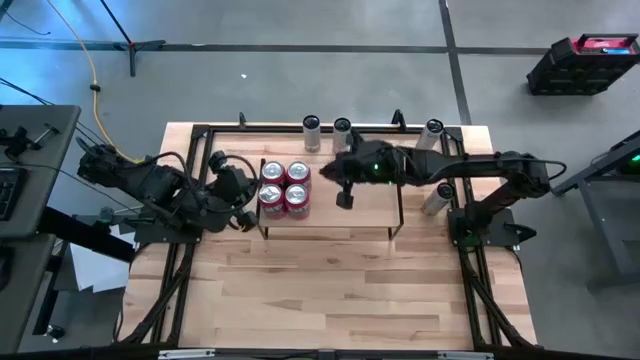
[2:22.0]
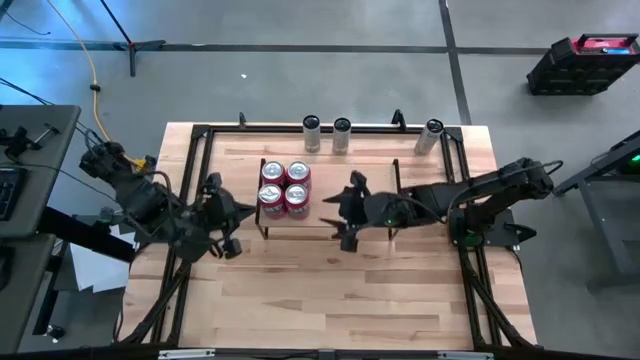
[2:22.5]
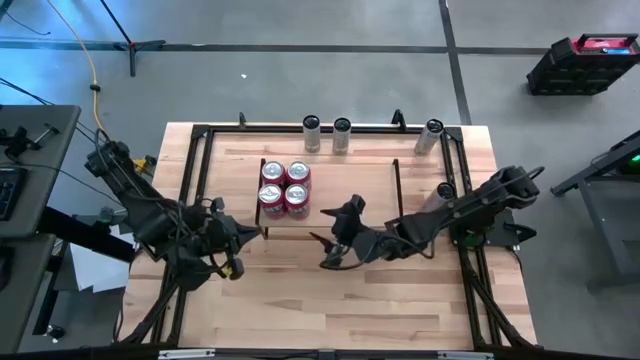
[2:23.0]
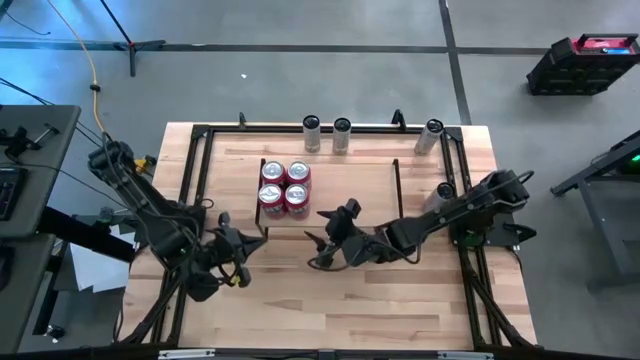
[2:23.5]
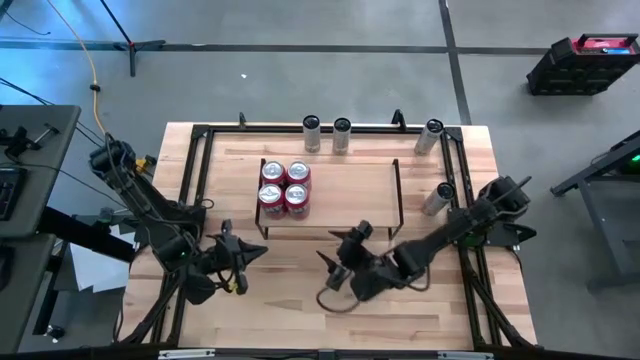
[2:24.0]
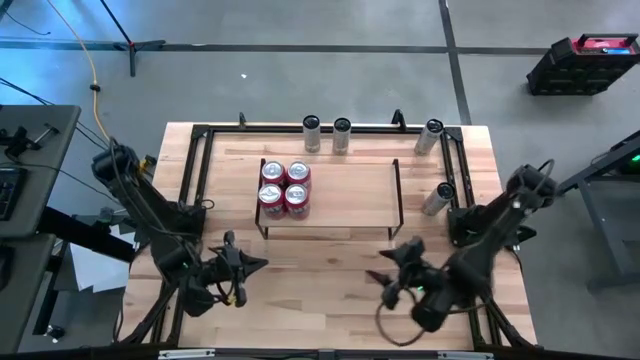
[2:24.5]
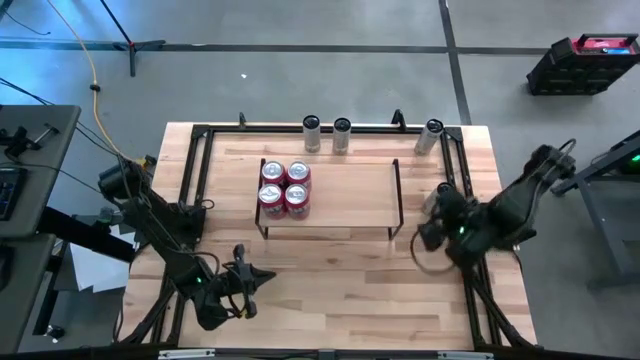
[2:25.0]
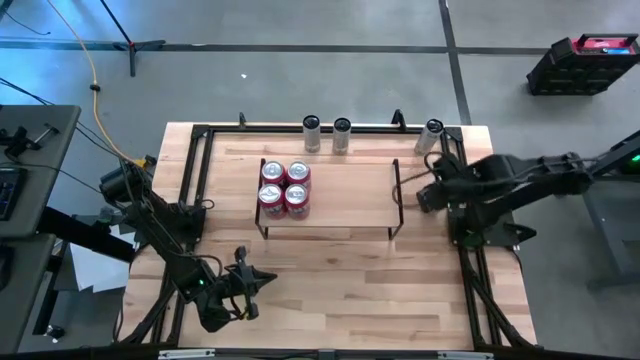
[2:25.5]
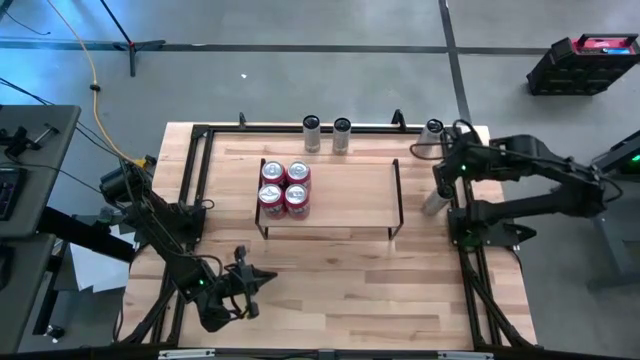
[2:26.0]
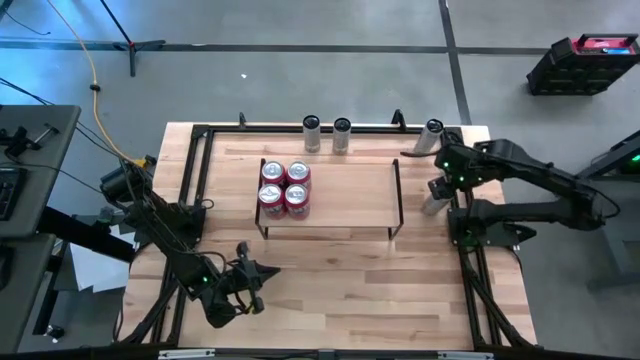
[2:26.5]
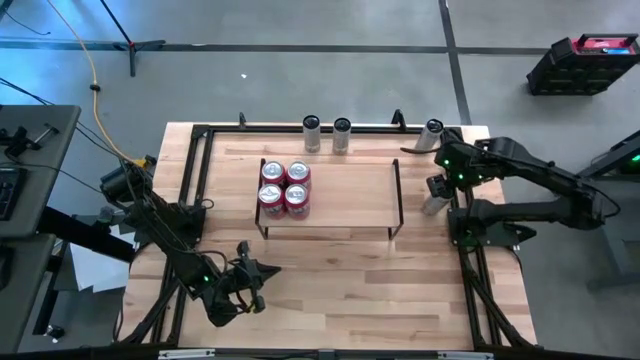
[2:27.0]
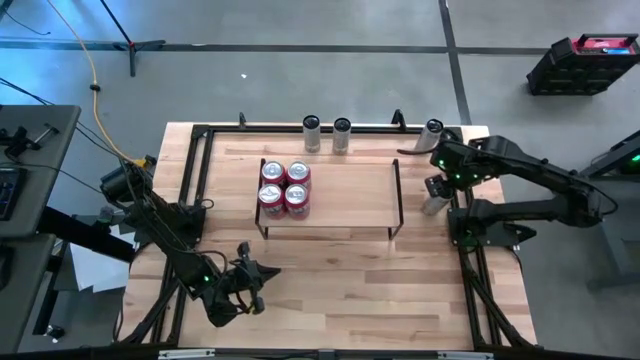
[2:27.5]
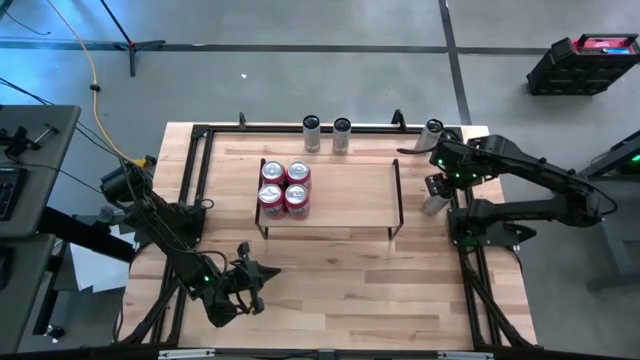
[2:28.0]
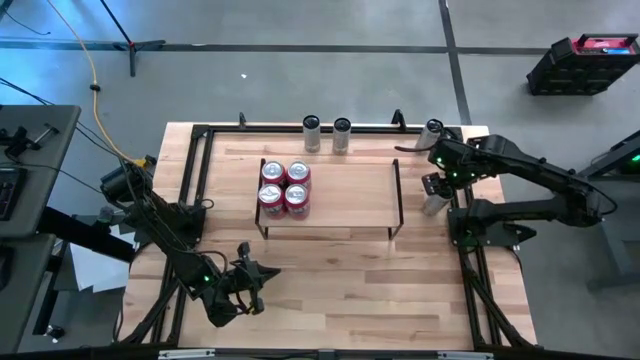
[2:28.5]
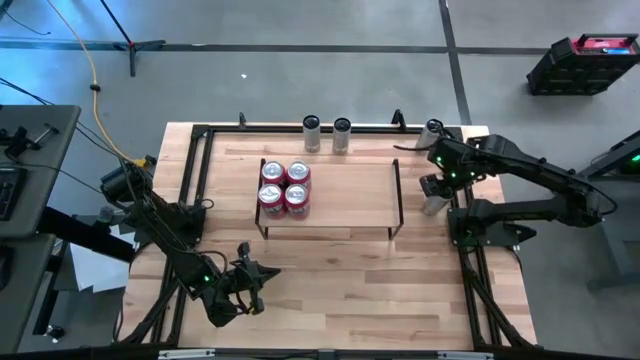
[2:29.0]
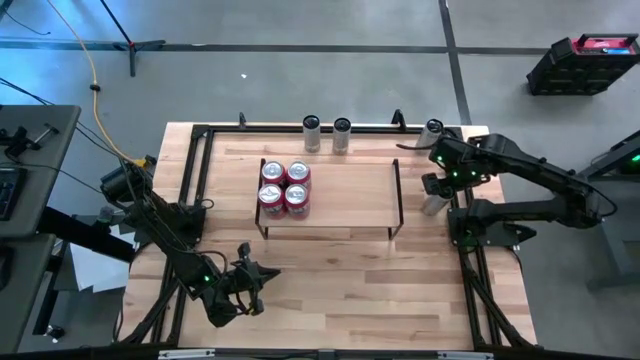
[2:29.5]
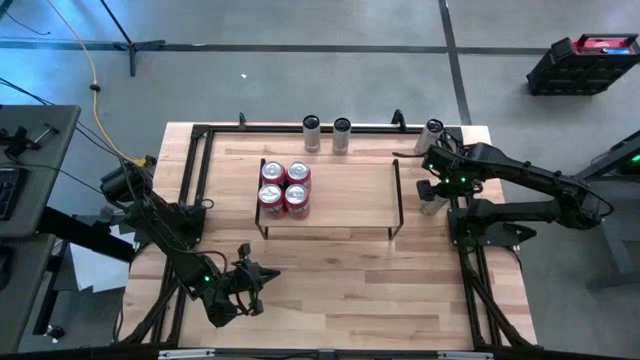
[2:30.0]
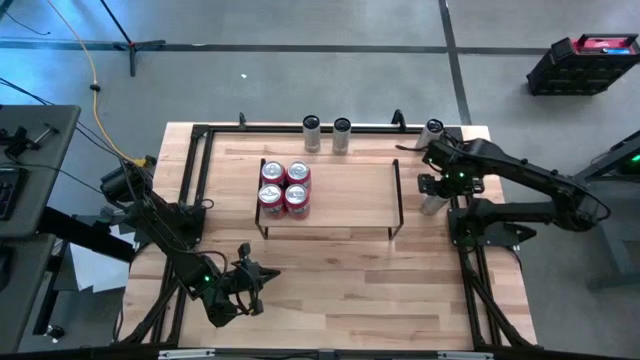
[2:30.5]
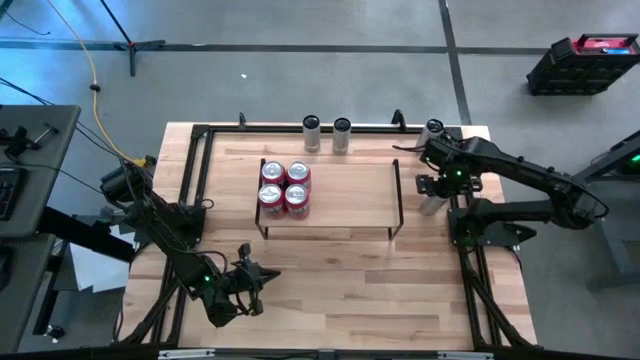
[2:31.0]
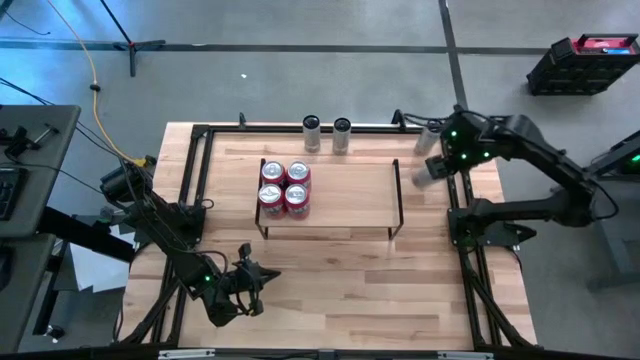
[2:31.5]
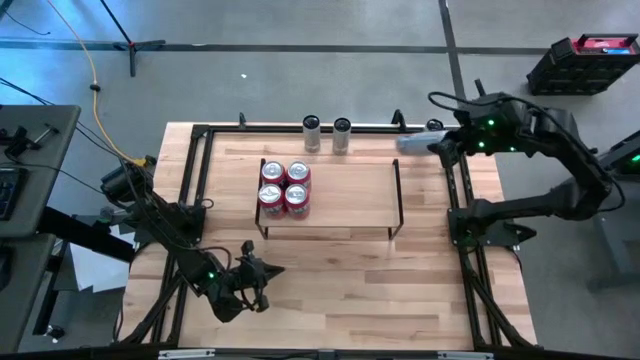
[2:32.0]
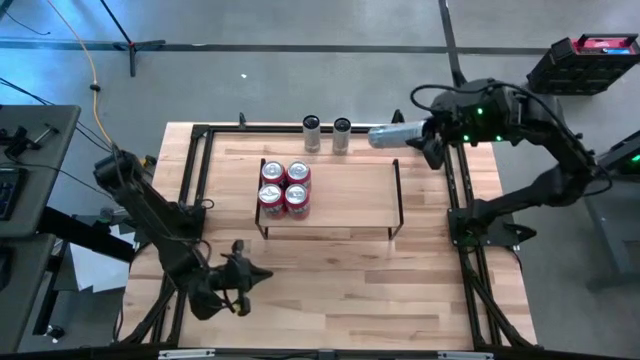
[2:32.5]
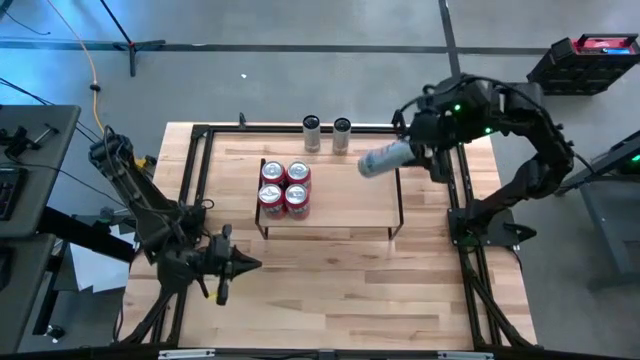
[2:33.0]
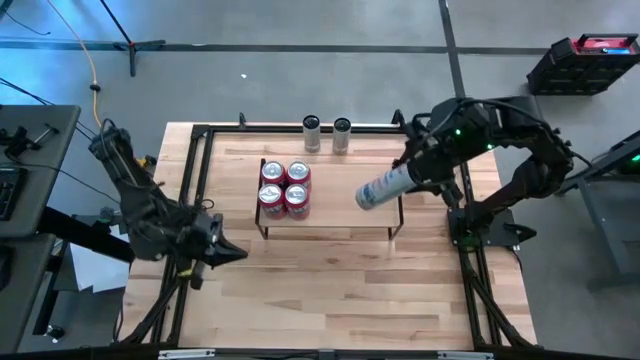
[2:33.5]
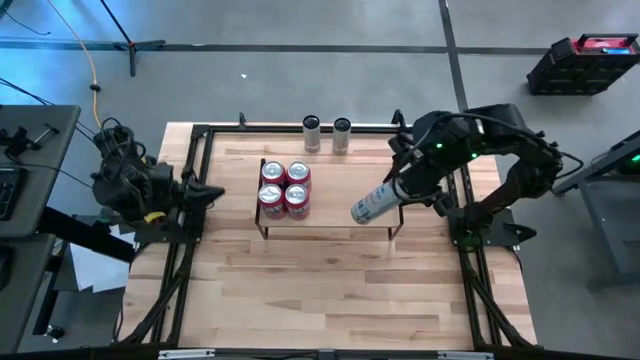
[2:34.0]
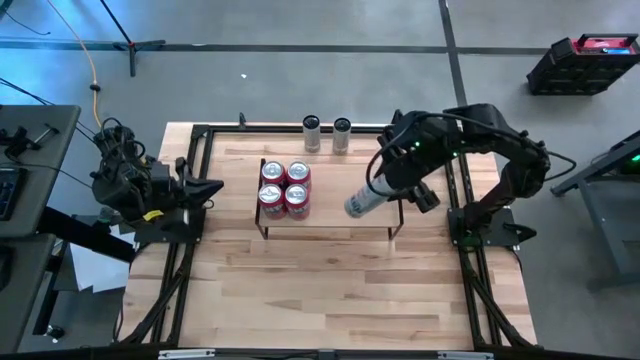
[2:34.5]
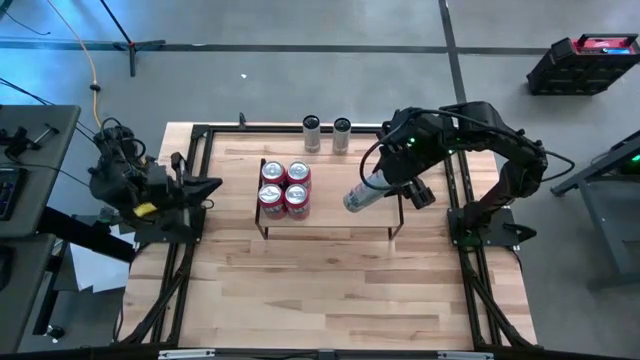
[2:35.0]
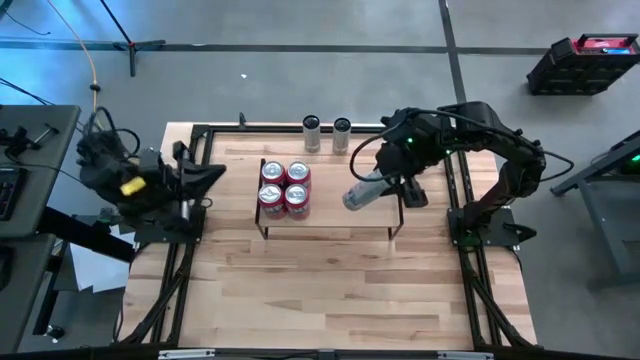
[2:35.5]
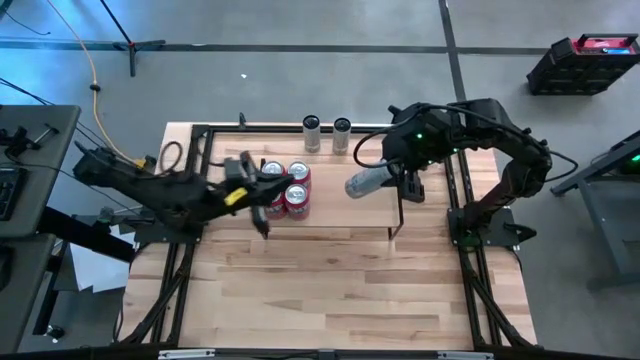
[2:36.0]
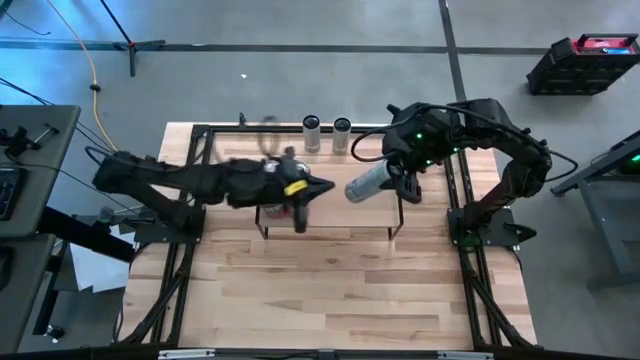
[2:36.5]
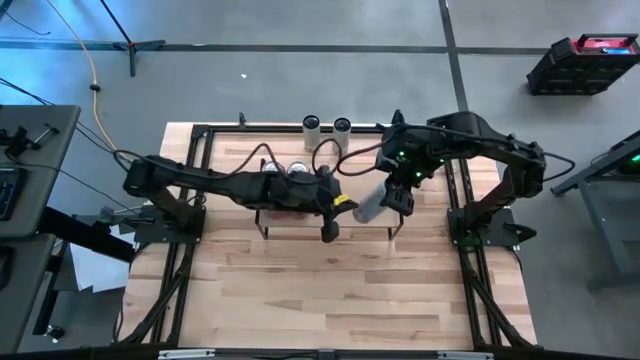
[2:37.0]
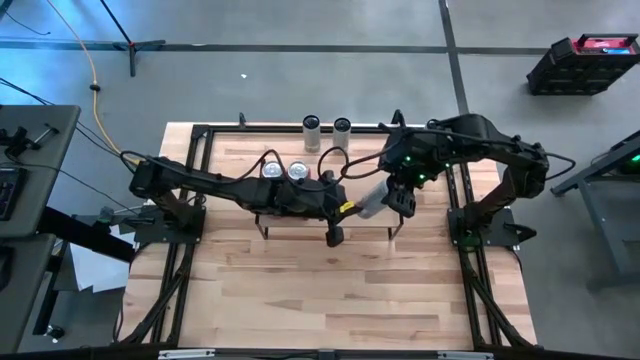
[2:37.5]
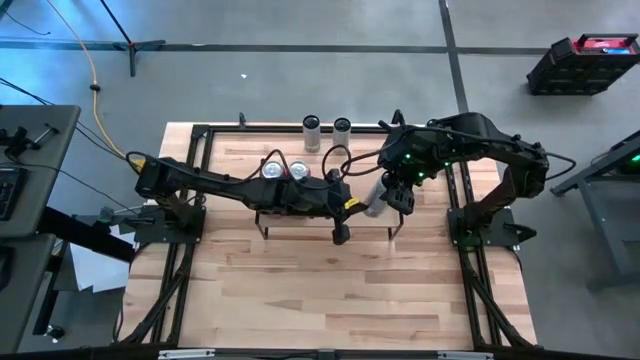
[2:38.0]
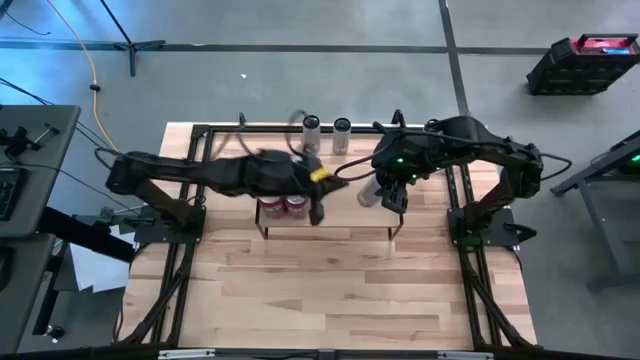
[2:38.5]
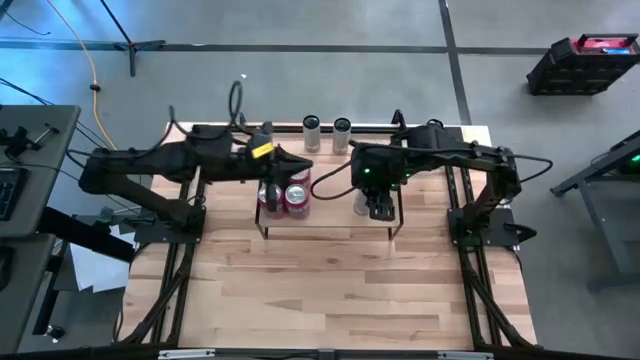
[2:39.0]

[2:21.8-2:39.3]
Task: Place canned beverage on shelf
Put the white yellow soda can on the shelf

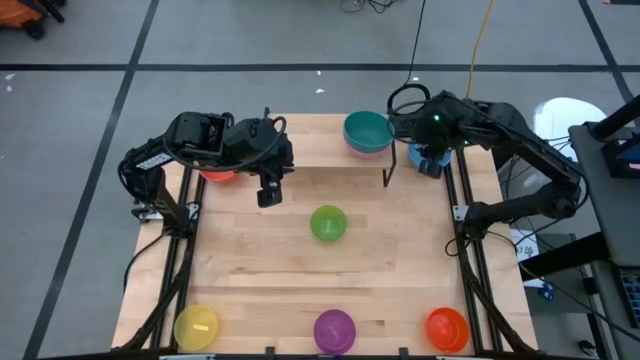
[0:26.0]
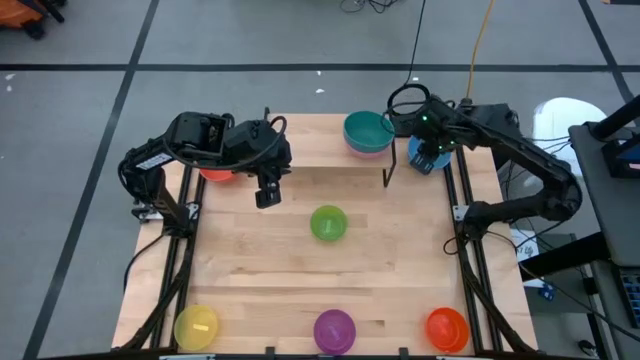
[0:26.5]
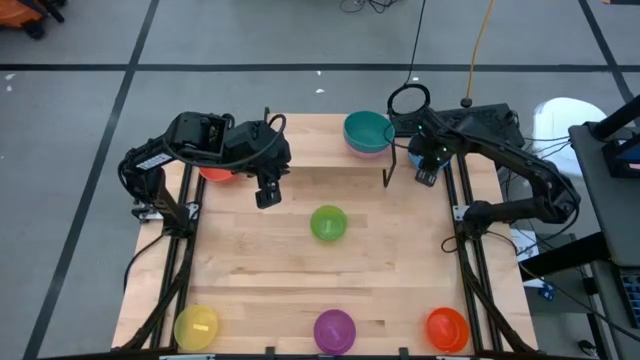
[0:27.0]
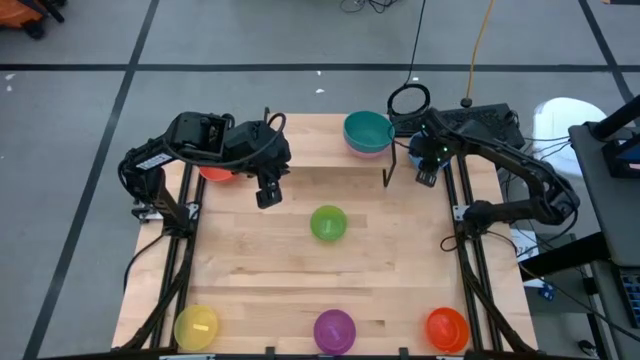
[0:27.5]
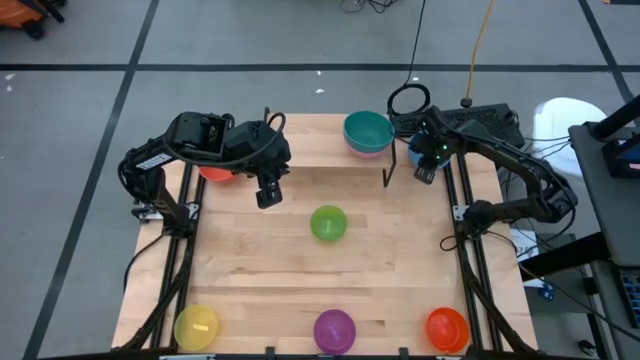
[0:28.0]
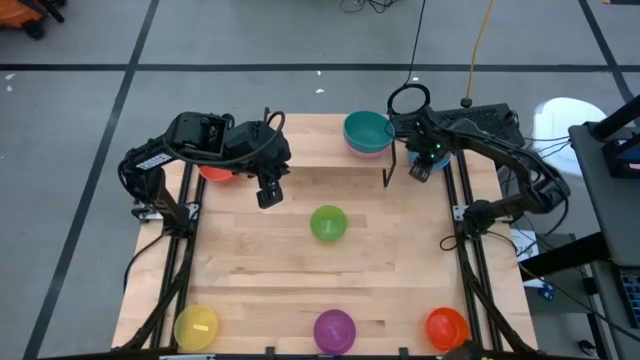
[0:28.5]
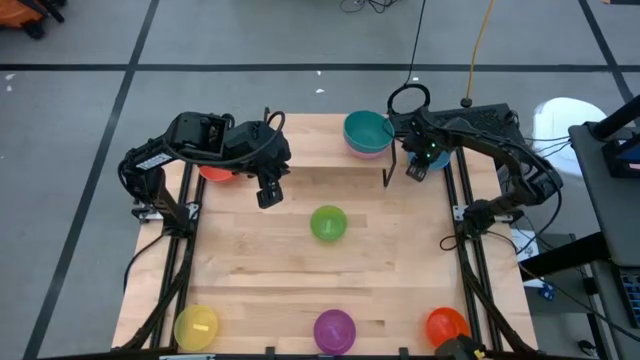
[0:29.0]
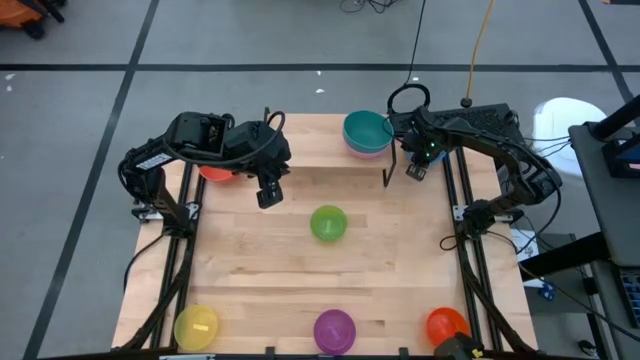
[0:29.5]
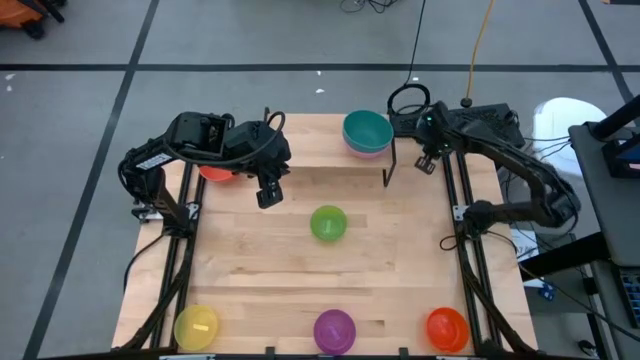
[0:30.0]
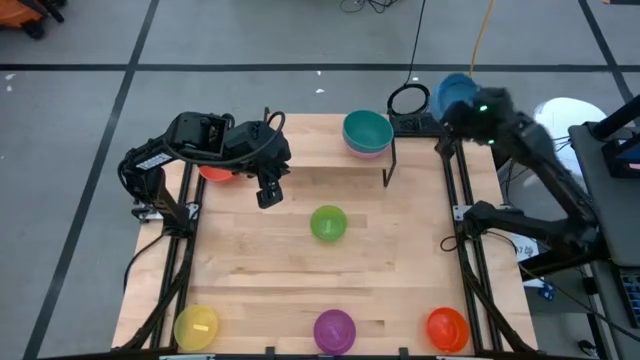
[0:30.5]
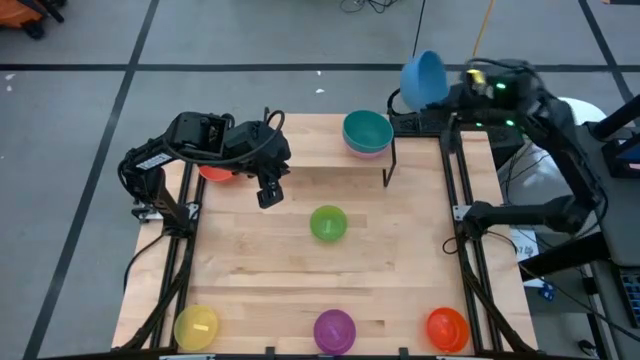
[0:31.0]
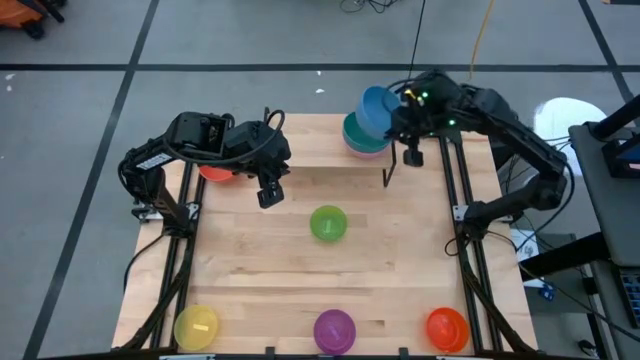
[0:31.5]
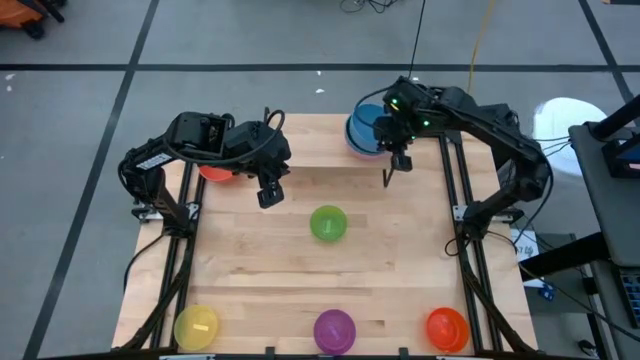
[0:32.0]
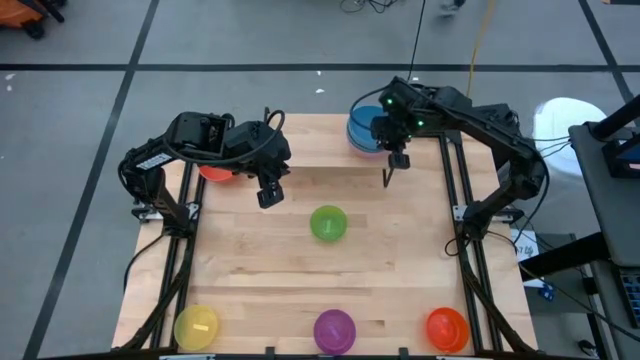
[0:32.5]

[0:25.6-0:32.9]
Task: Place and stack bowls onto a shelf
Stack the blue bowl on top of the dark green bowl on the shelf
